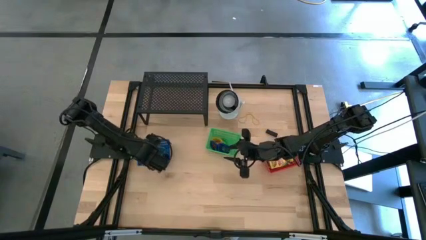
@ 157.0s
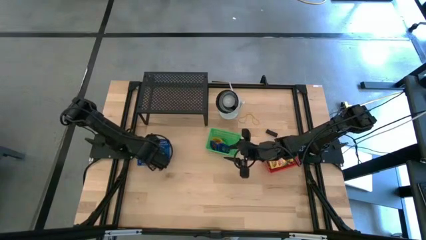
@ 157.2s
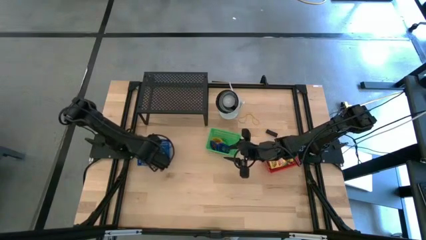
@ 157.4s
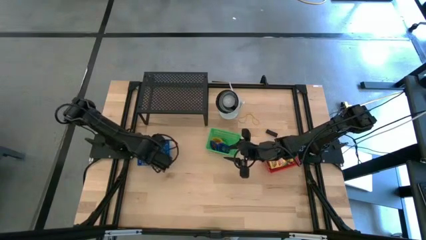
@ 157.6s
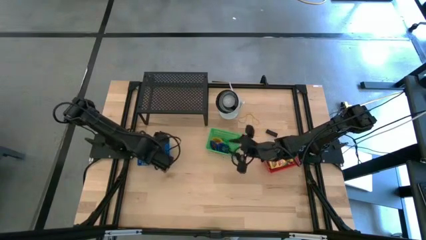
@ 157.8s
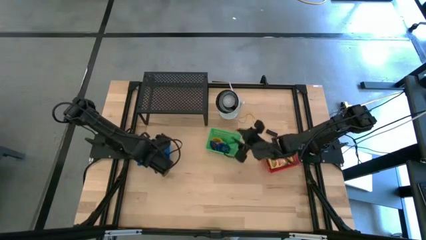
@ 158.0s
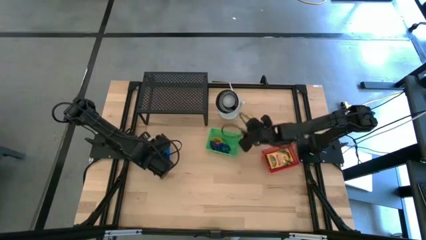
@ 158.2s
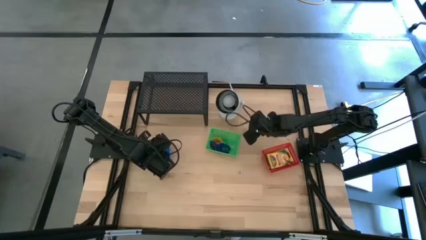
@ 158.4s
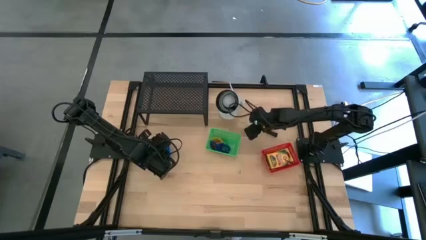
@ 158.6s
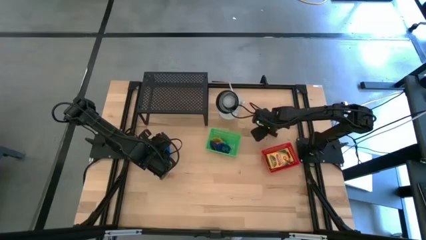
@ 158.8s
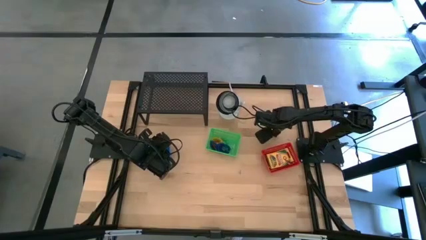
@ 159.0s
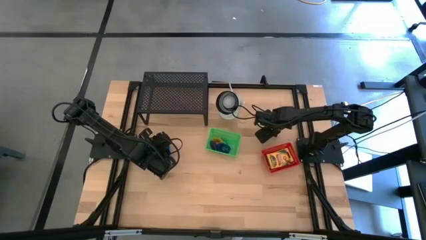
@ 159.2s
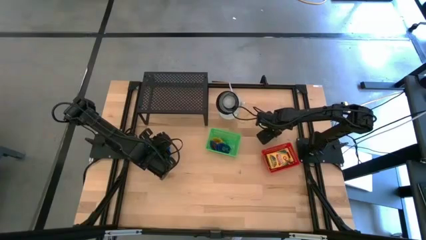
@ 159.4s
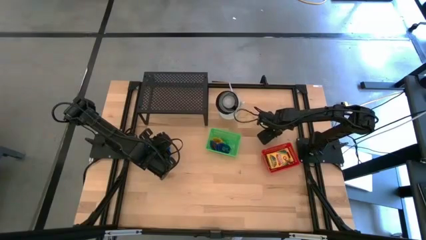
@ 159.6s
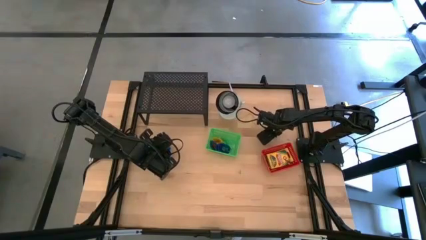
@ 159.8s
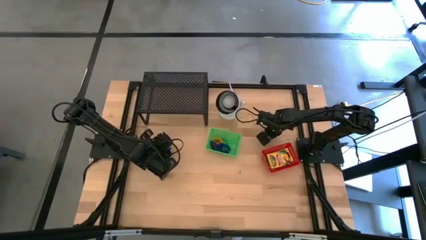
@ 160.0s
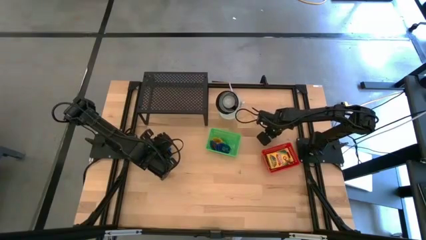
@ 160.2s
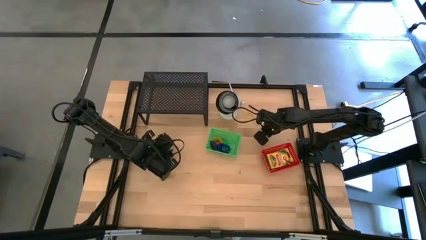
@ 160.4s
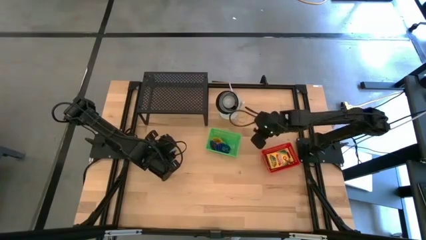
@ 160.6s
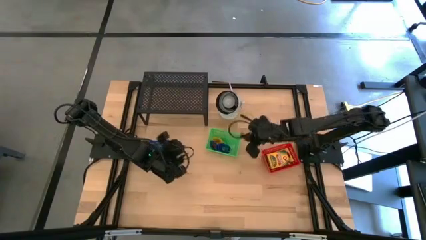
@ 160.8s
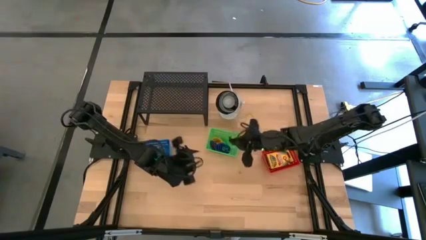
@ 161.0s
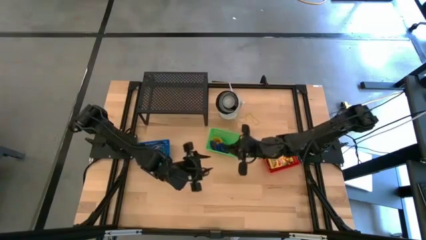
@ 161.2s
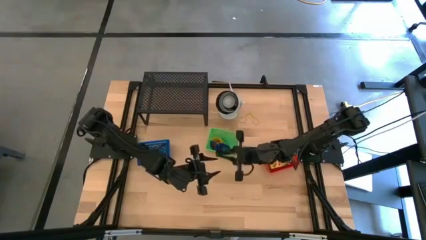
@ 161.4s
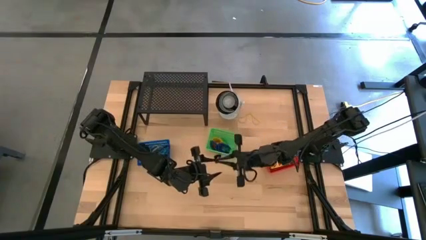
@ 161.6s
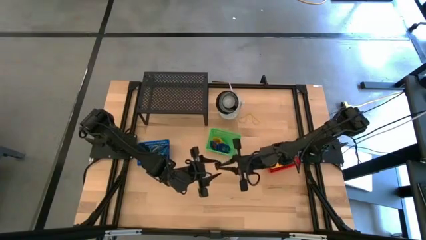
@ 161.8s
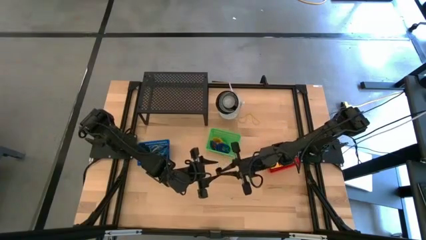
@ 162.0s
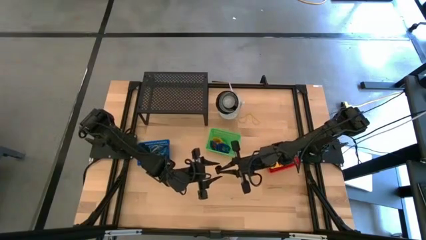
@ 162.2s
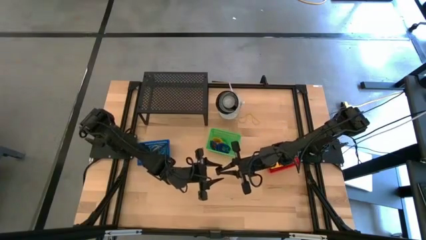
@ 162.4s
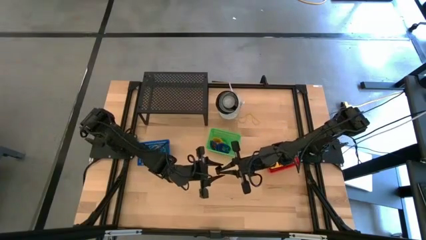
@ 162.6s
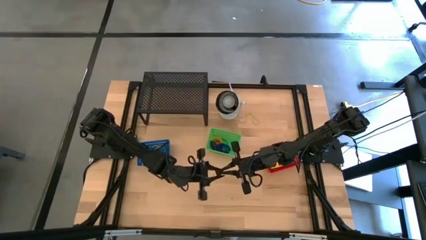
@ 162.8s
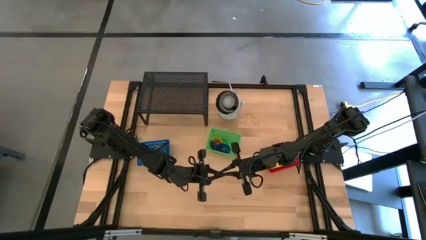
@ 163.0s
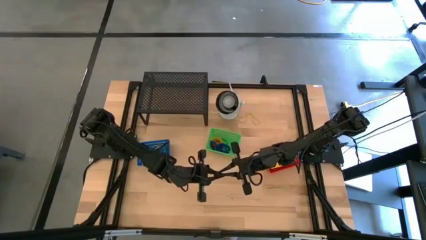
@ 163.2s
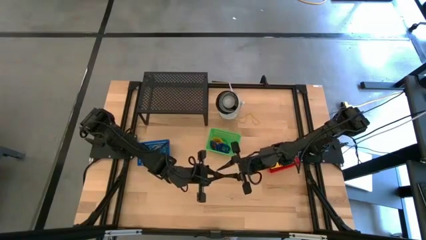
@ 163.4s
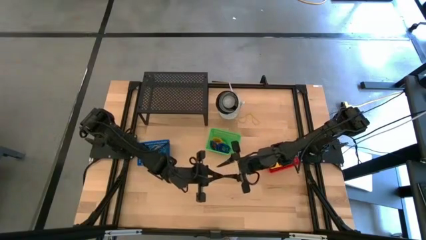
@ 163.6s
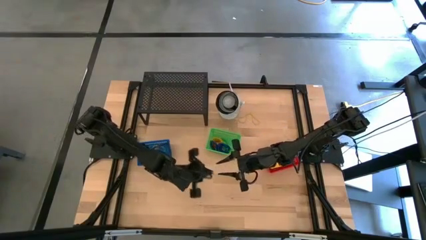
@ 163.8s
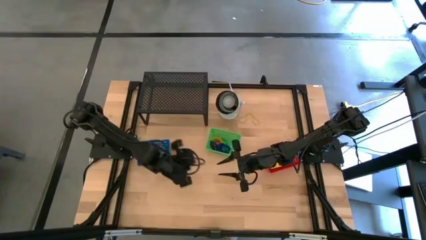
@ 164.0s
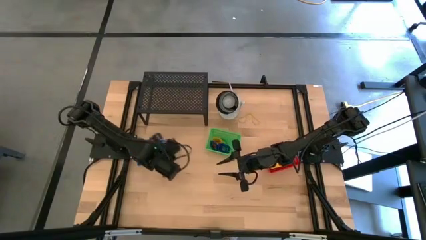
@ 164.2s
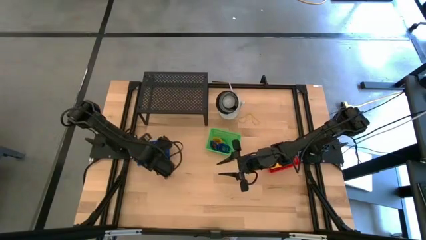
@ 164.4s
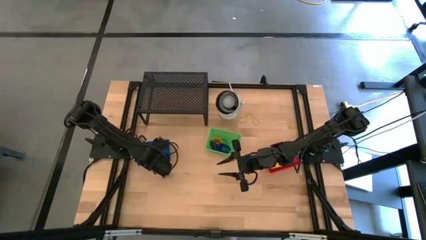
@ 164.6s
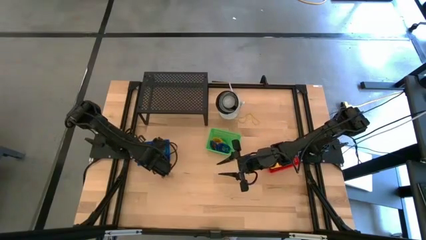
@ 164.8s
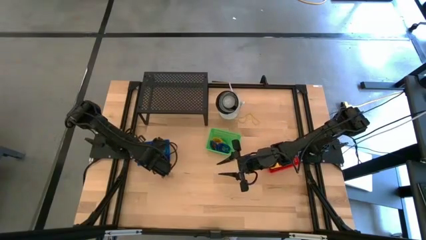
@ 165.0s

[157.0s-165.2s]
Task: Pick & Place Office Desk Supplies
Put the black rubber band into the blue bin

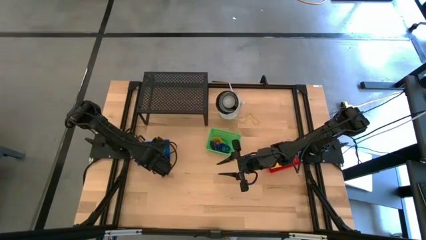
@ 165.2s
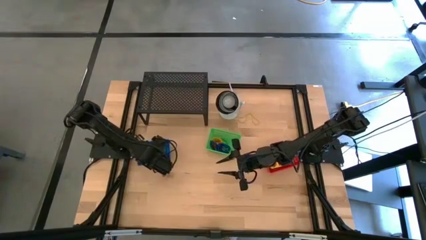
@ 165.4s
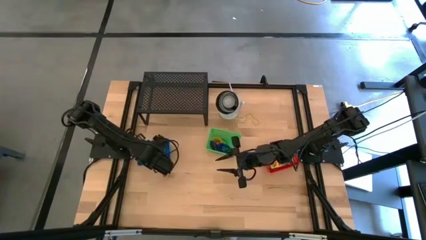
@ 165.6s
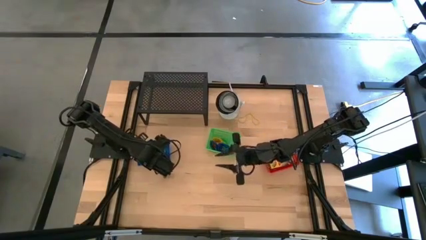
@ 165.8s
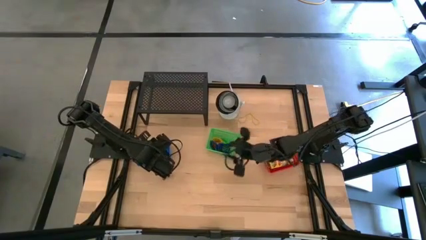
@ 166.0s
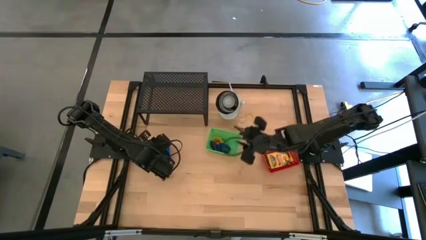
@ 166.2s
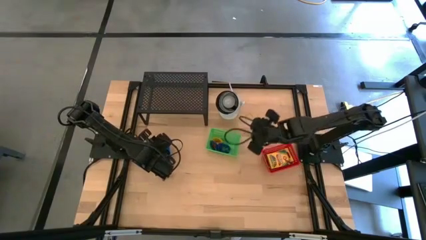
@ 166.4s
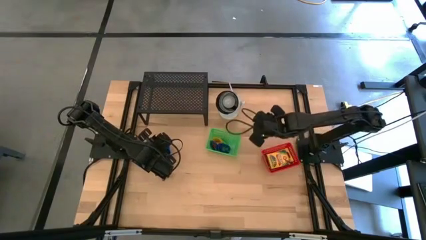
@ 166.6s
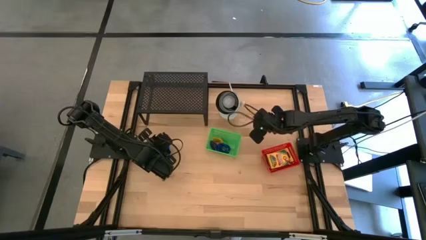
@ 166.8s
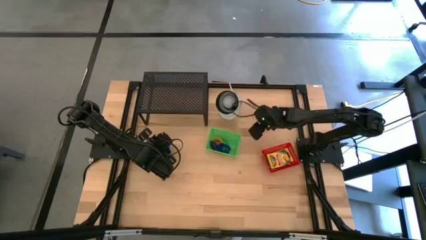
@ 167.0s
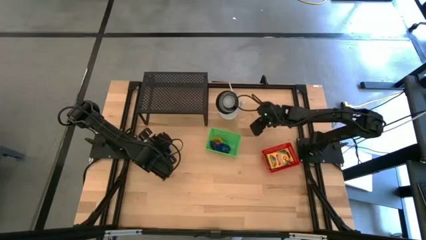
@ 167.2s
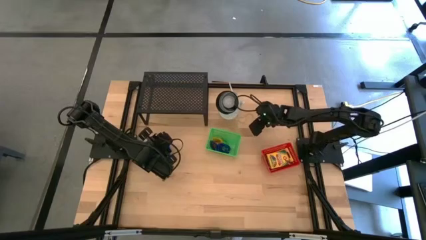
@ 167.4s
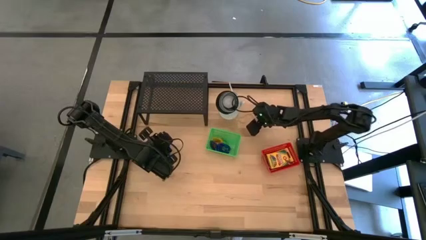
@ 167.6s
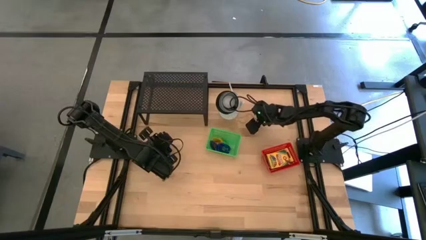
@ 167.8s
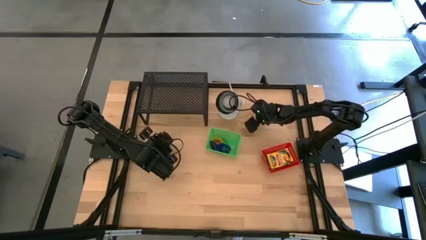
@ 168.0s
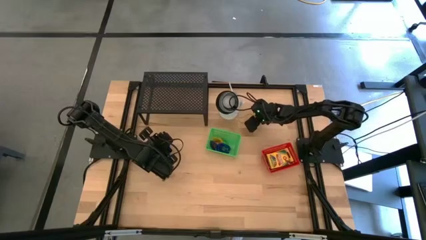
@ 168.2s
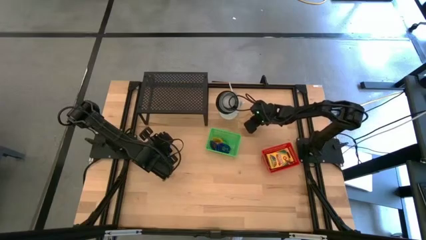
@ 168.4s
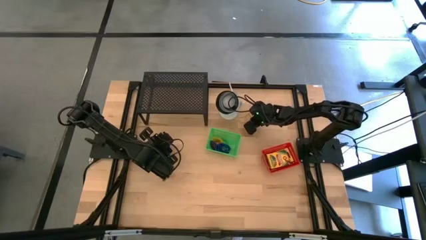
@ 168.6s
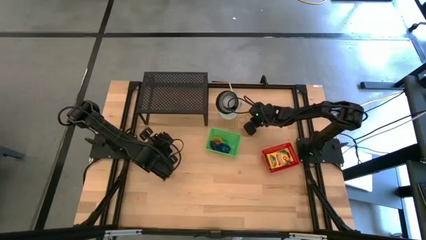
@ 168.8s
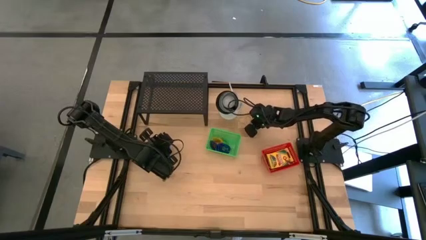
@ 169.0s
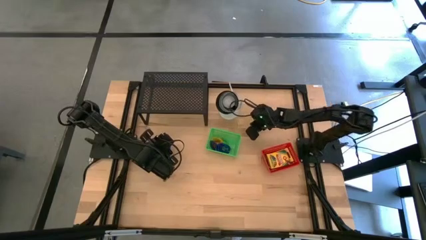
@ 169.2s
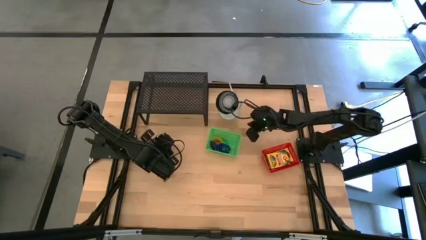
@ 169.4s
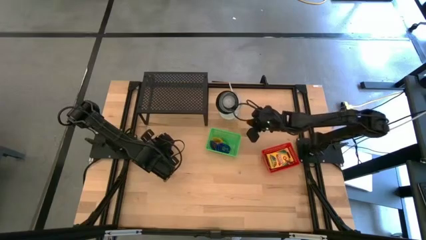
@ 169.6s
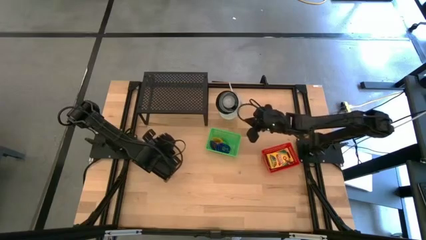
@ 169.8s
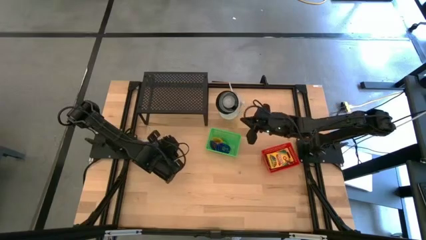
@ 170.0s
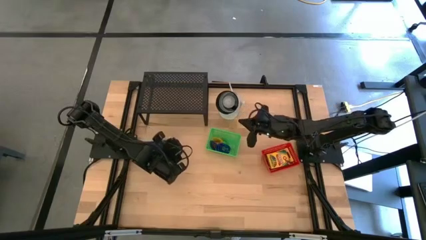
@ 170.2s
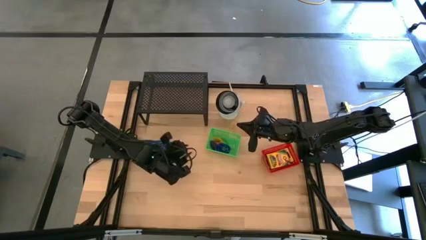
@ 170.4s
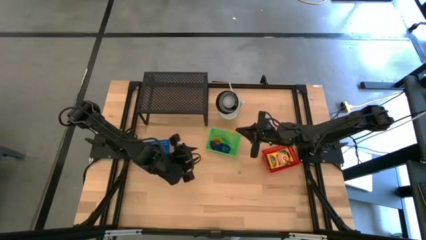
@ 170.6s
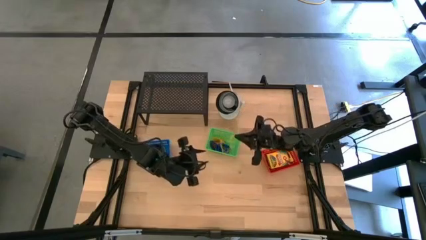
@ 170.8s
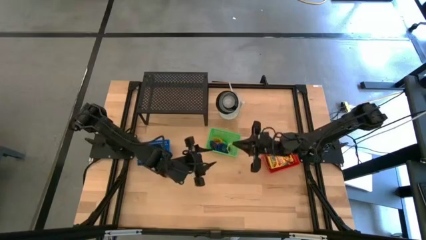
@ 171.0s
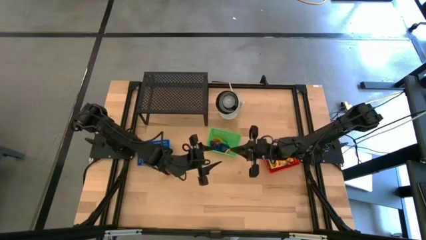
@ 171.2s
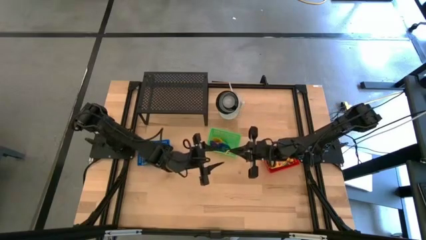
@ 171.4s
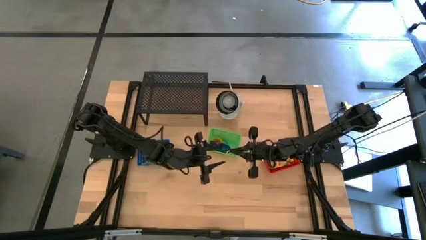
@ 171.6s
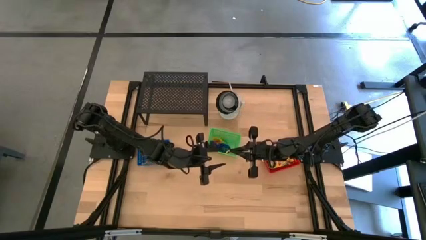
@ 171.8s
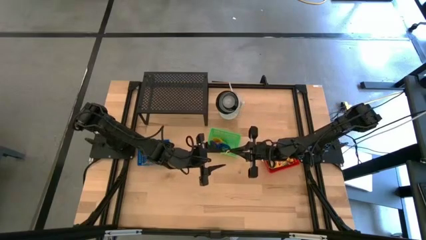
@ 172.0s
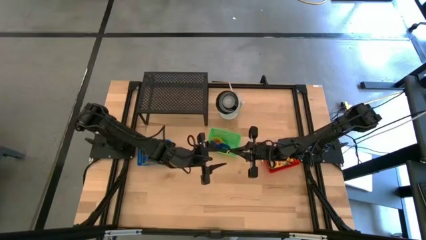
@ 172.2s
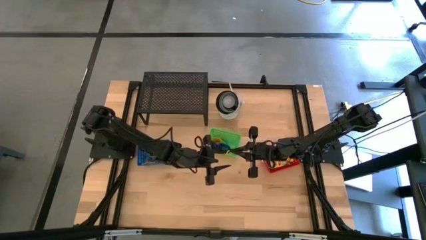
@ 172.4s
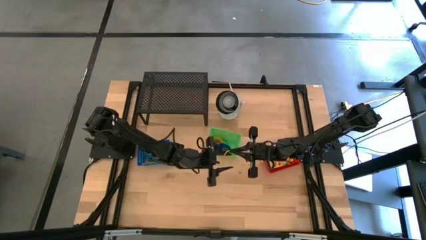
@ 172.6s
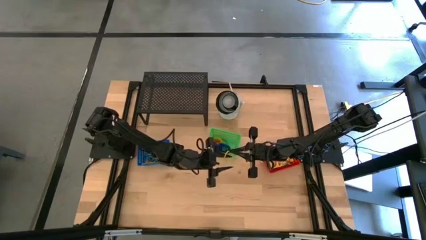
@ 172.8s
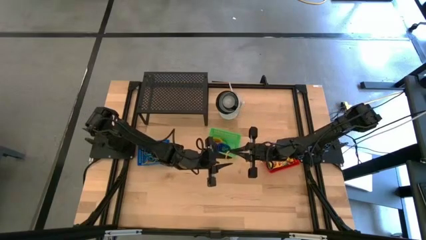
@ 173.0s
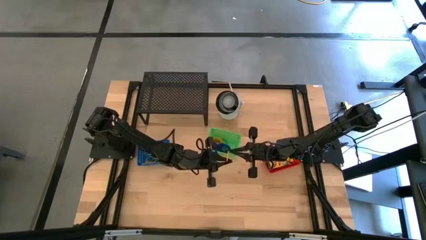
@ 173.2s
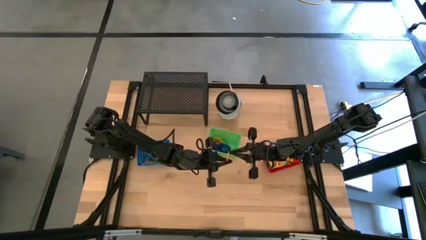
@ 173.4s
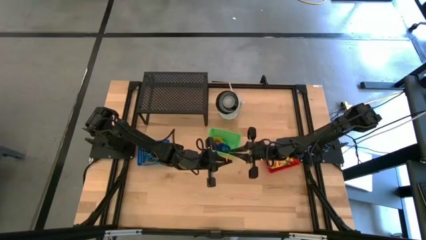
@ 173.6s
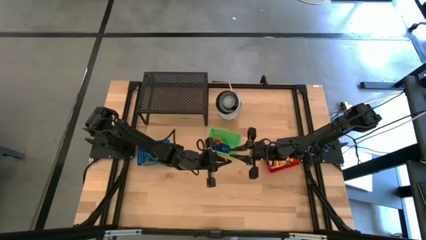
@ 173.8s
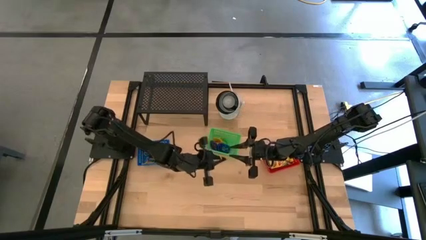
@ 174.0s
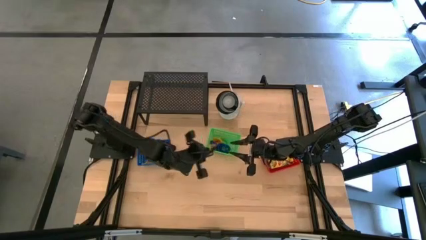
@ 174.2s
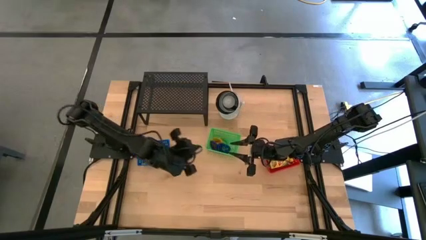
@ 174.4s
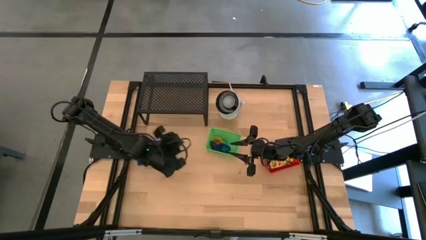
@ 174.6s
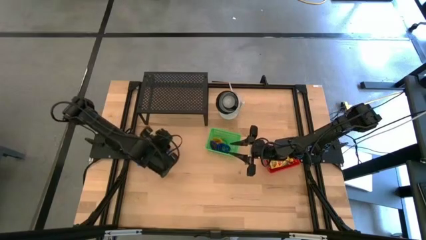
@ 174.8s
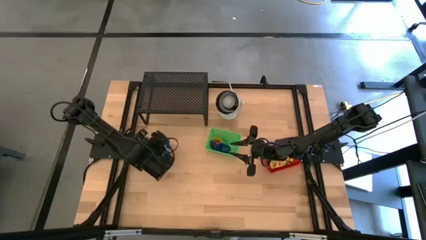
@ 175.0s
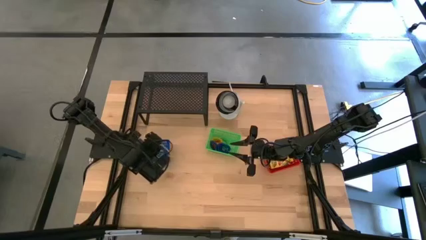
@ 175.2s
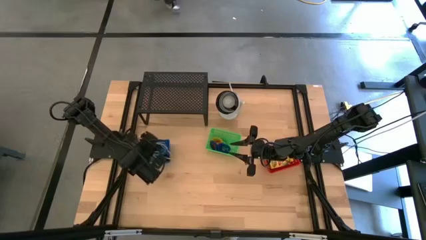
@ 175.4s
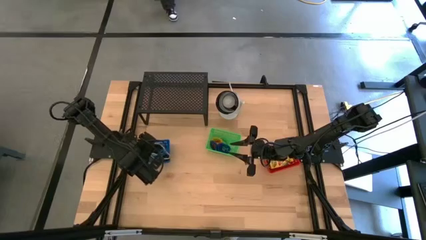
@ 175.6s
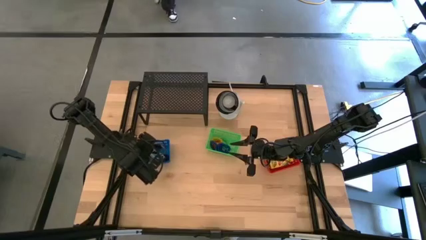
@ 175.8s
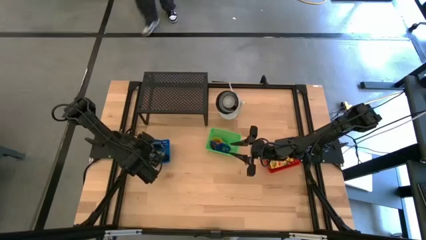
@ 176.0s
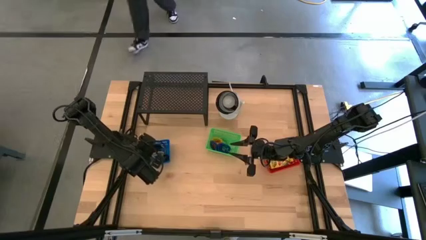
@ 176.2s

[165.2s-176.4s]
Put the yellow rubber band into the blue bin
